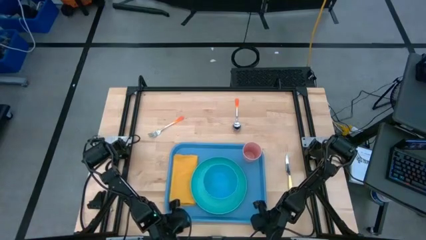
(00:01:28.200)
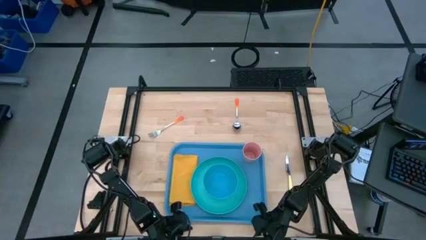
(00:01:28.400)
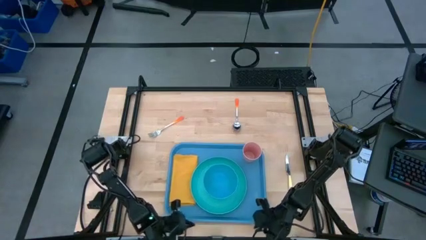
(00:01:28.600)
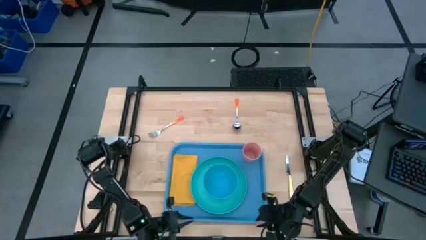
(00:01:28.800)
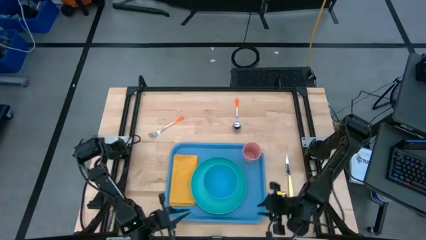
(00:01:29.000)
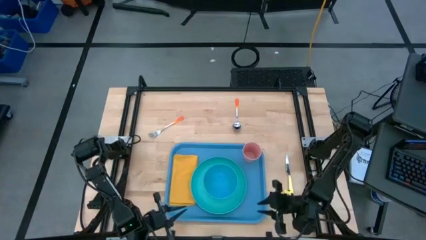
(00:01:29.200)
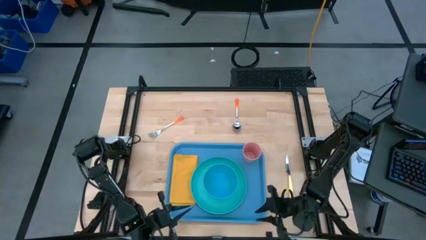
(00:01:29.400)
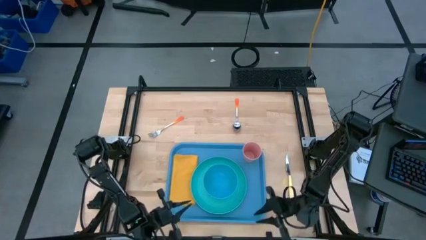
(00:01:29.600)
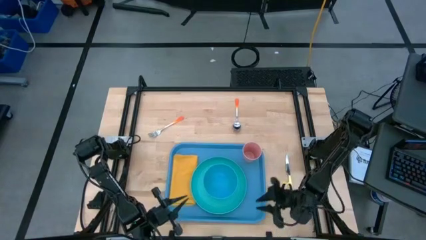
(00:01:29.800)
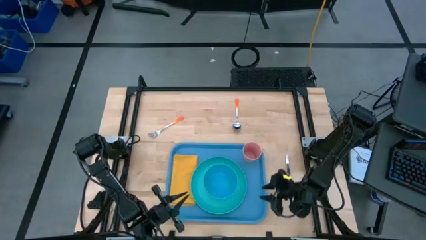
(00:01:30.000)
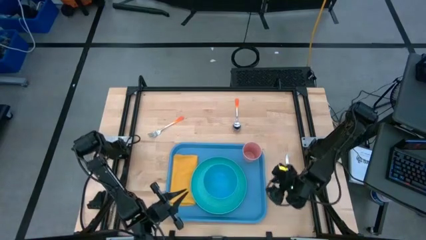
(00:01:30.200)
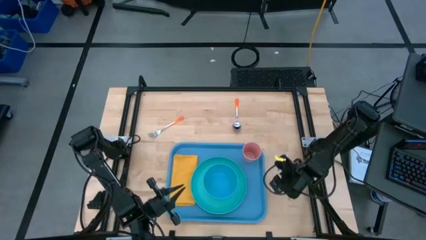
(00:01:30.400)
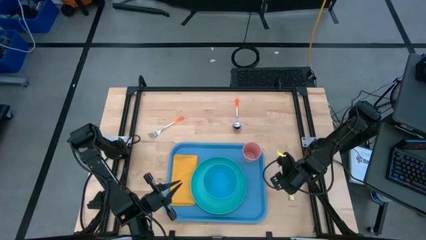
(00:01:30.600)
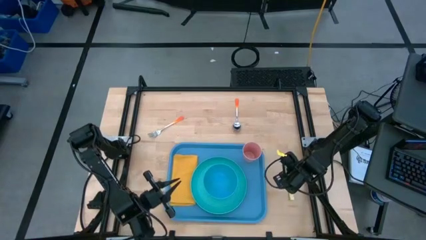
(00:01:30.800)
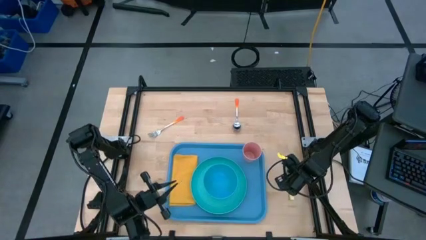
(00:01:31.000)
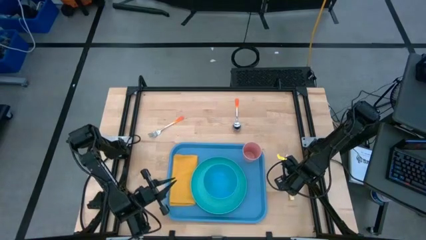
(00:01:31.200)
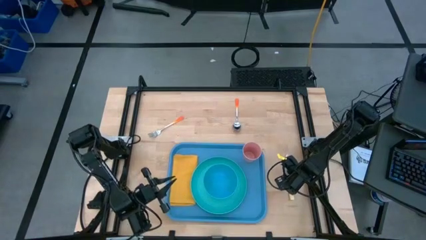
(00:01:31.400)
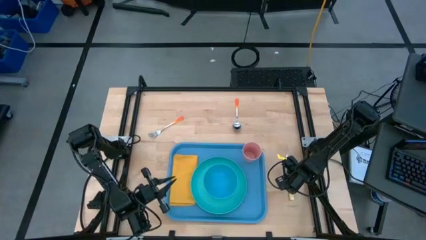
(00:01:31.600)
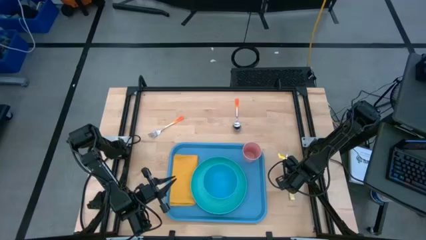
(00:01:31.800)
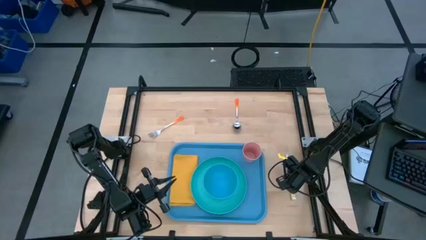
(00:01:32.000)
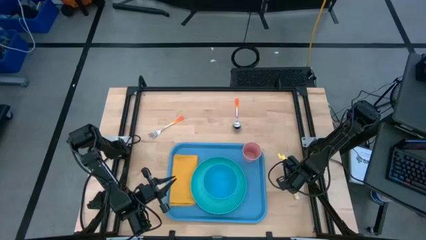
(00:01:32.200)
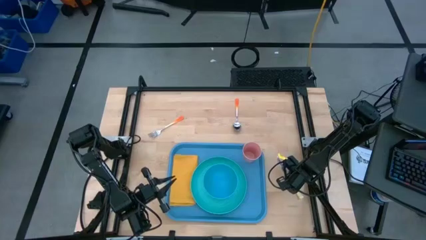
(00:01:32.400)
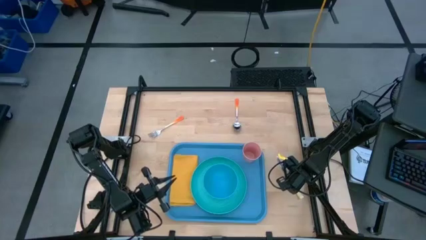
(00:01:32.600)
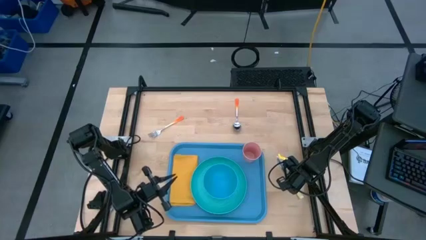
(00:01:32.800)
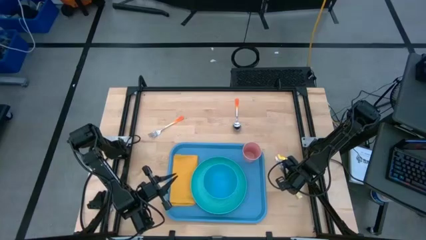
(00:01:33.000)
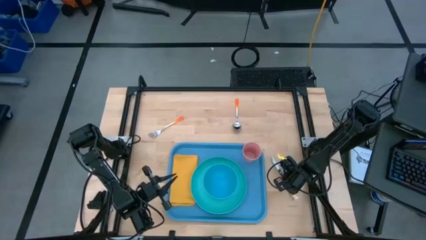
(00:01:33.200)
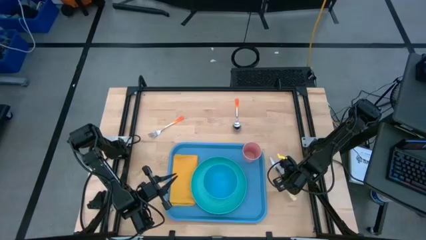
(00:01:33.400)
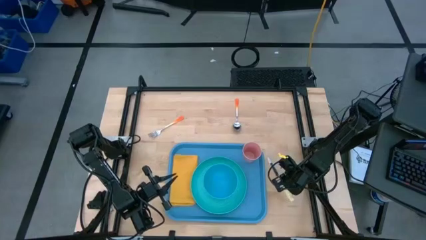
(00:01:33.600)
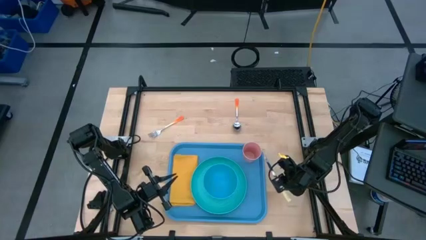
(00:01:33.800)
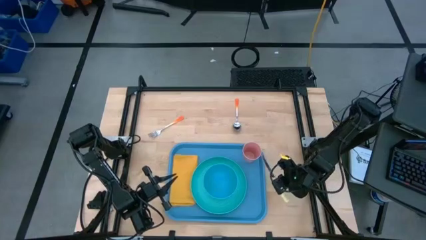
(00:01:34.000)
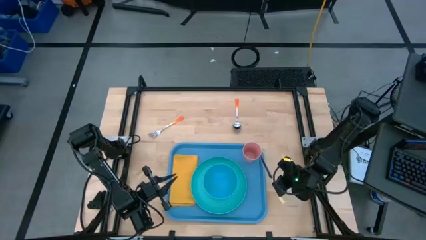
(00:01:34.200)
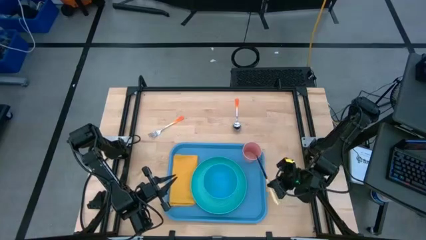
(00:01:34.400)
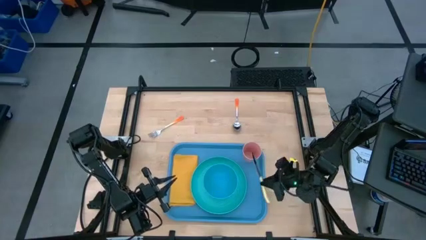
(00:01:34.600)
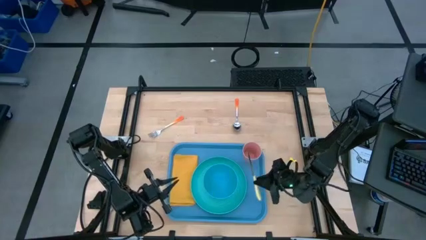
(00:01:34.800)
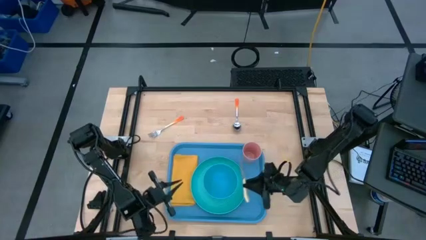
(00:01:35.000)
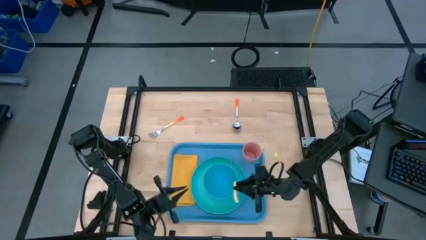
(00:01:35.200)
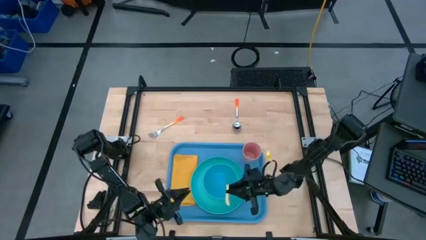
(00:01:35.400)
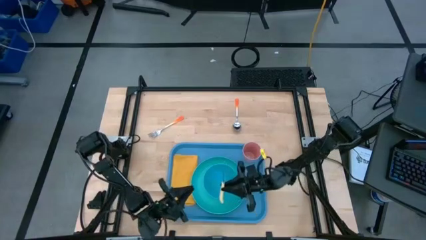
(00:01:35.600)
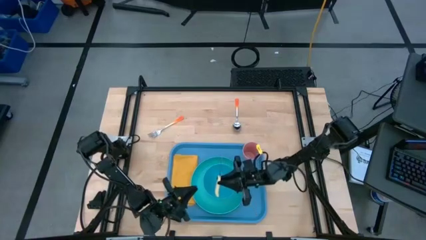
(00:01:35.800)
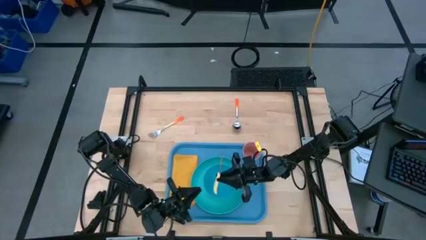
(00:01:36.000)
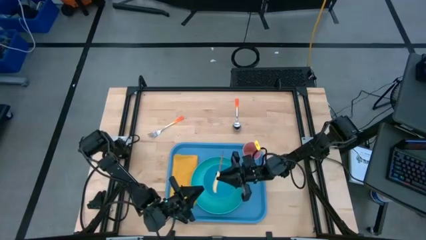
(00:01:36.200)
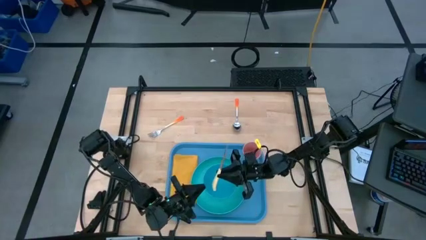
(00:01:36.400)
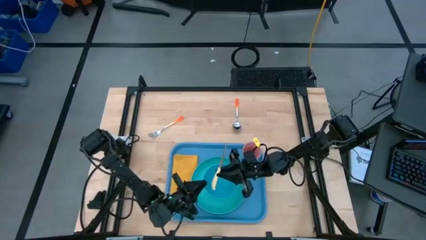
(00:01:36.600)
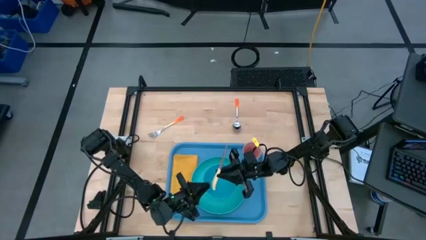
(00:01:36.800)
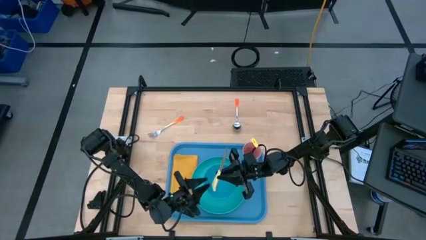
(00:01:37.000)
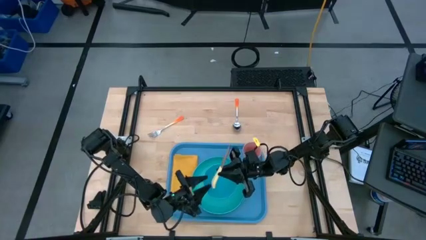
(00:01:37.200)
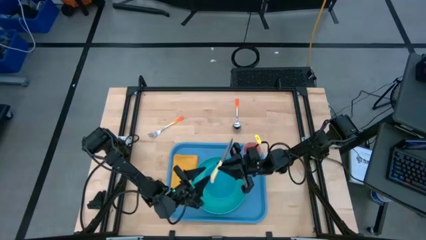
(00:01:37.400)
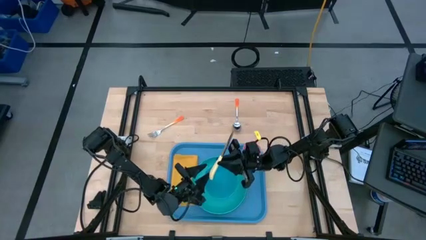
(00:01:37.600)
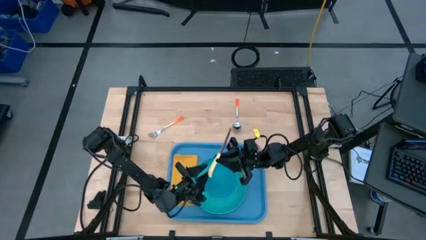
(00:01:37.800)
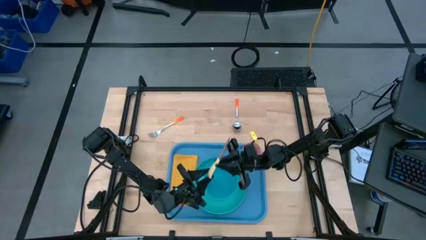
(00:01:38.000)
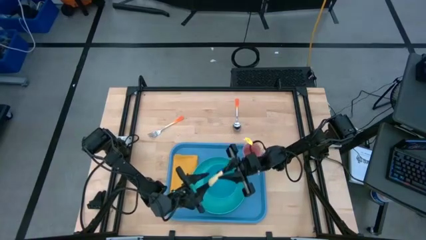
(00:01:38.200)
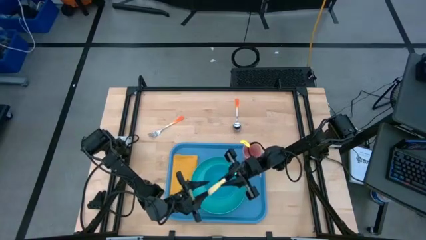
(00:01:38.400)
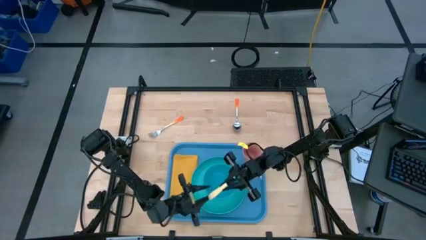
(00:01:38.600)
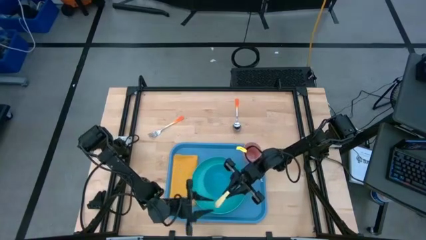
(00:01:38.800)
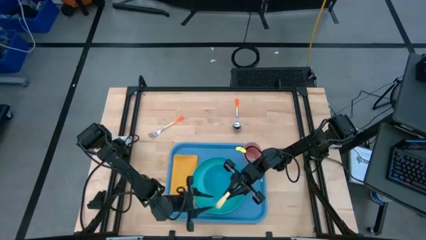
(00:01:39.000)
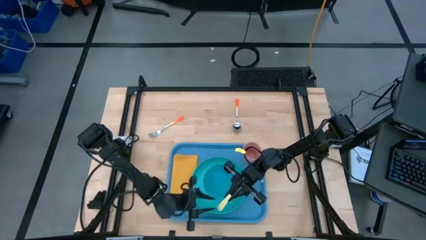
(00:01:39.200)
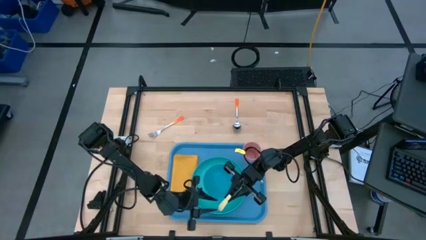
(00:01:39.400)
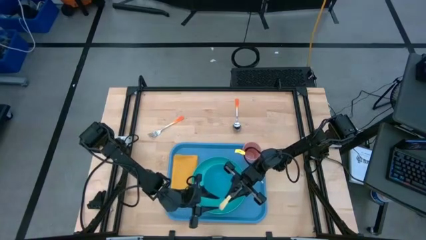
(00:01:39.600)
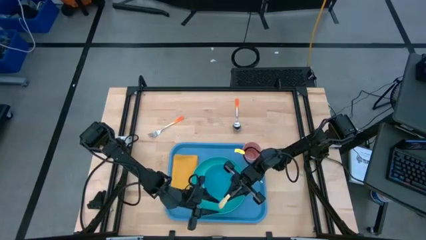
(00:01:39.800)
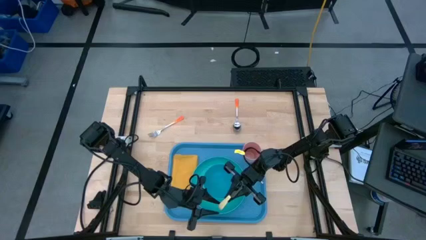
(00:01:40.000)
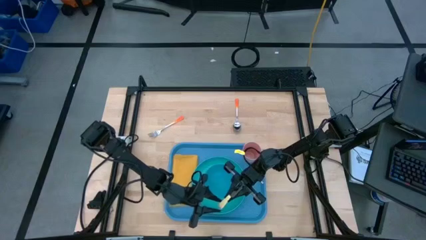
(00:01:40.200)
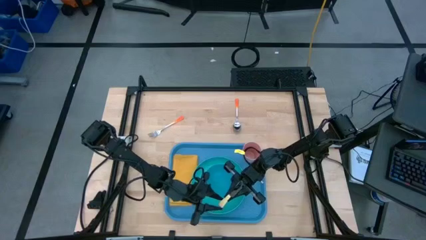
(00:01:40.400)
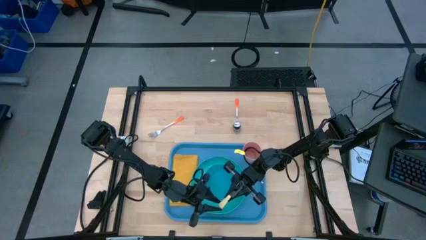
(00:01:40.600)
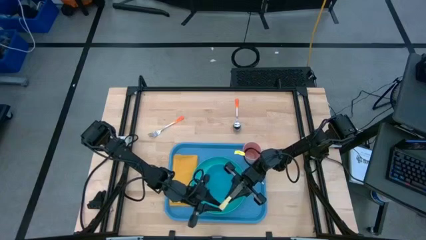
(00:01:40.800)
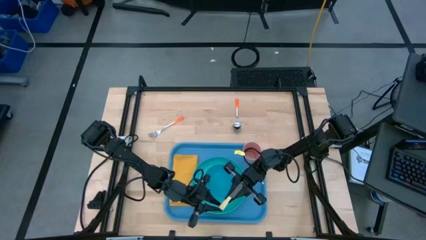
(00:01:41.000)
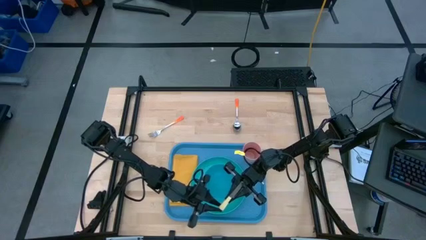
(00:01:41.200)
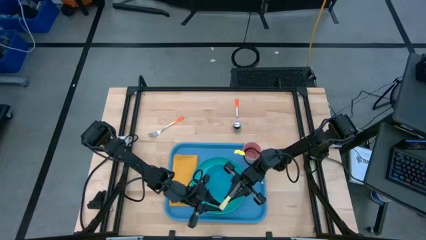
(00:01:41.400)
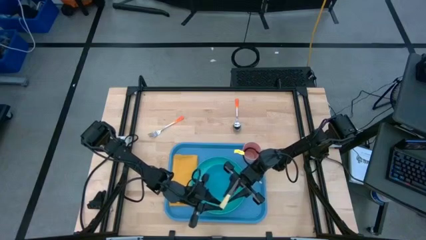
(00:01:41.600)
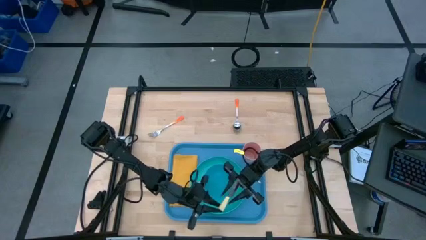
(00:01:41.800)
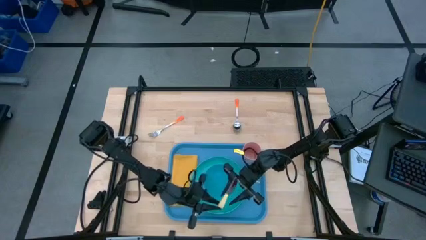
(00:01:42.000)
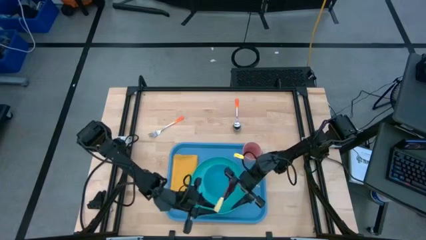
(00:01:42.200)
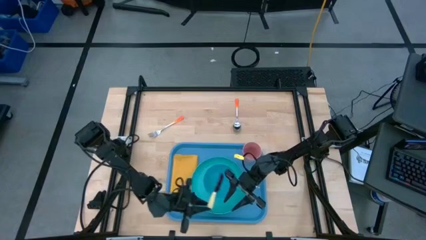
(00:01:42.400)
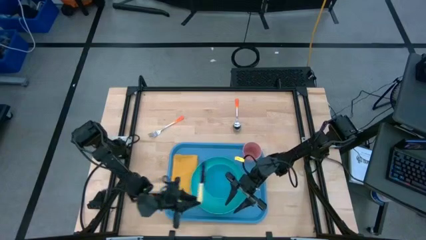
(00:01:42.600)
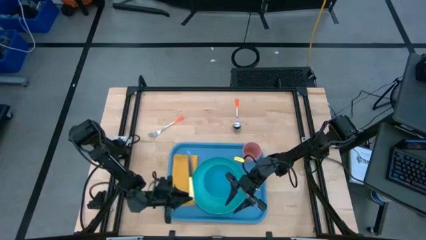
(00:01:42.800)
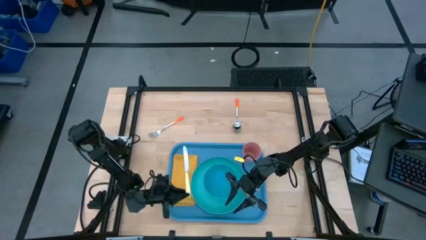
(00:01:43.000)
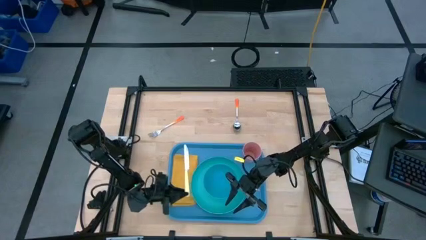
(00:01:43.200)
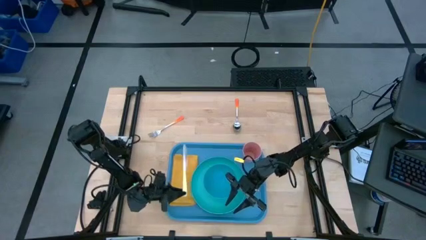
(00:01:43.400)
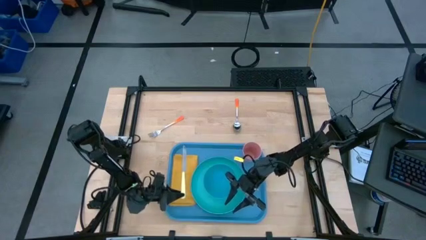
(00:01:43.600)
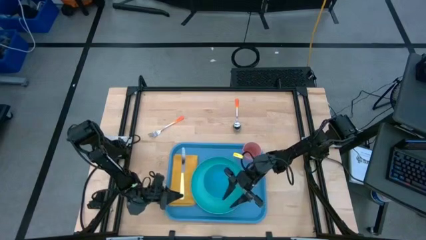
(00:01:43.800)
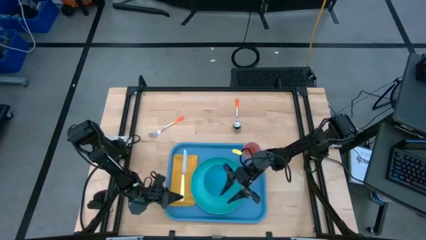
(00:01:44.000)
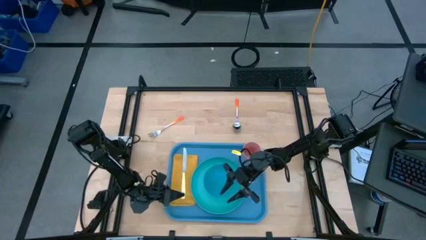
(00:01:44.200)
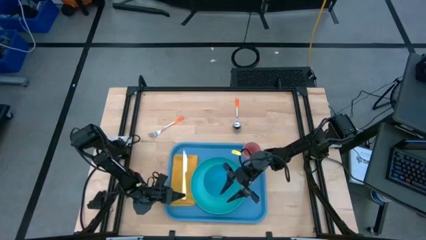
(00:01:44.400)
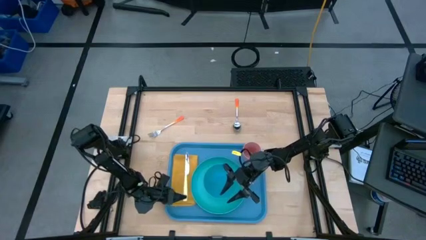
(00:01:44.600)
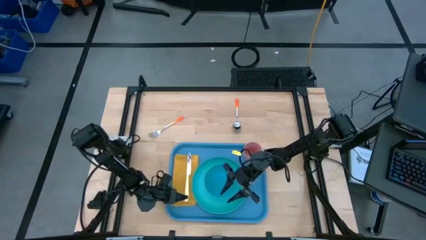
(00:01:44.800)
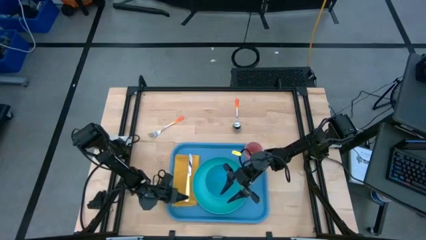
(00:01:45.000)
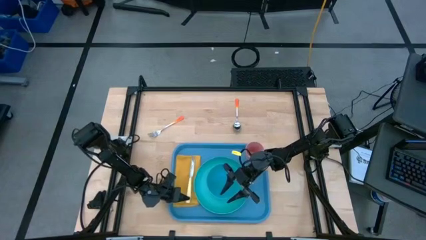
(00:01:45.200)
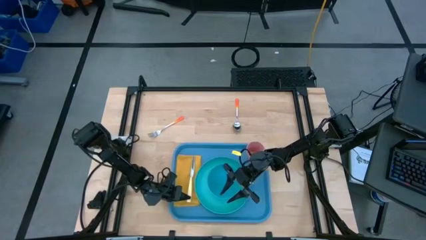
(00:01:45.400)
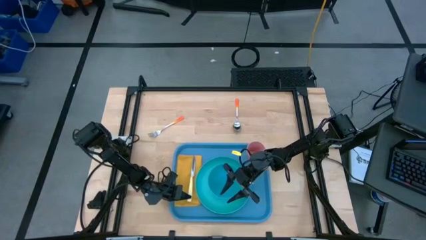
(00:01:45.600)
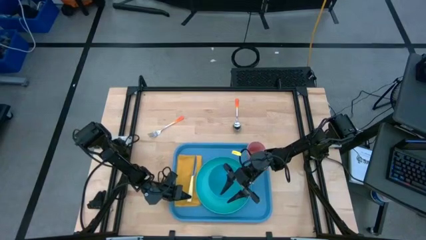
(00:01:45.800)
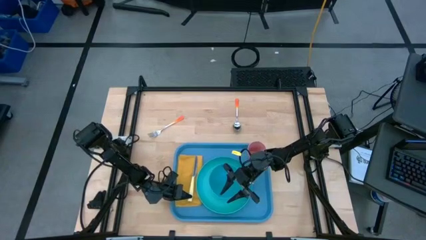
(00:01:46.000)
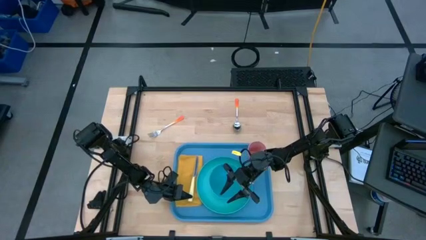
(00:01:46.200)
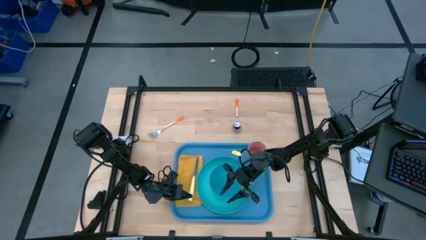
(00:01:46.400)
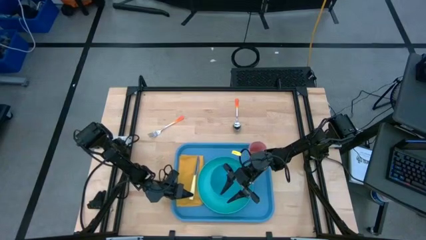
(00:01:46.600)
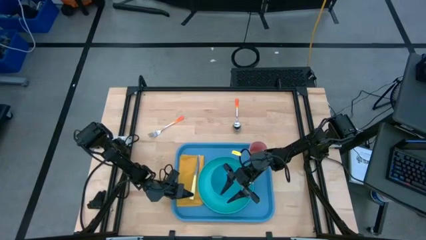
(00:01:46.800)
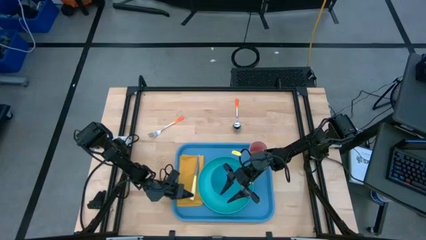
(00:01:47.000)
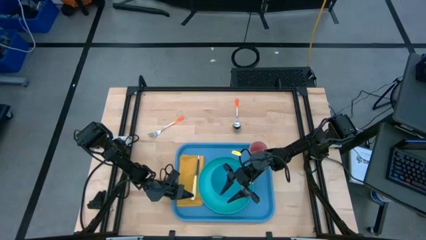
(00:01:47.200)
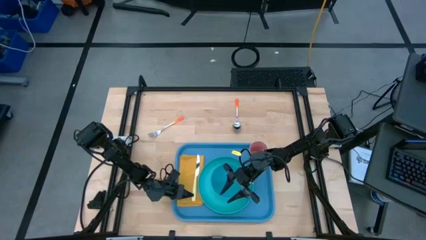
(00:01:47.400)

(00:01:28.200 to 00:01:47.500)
Task: Set up tray
Put the yellow knife on top of the yellow napkin
